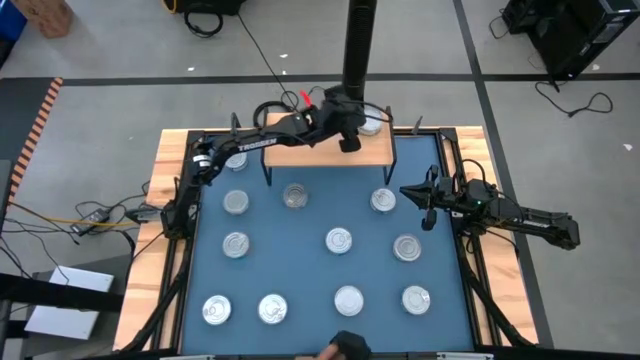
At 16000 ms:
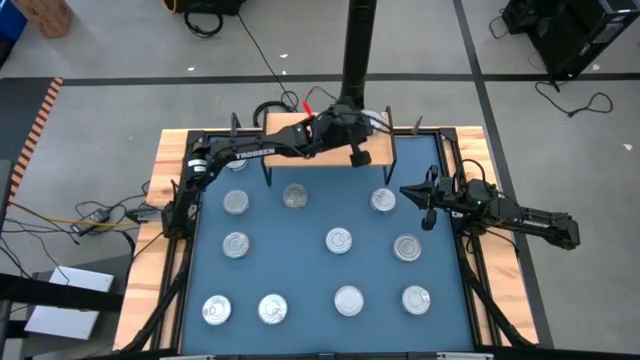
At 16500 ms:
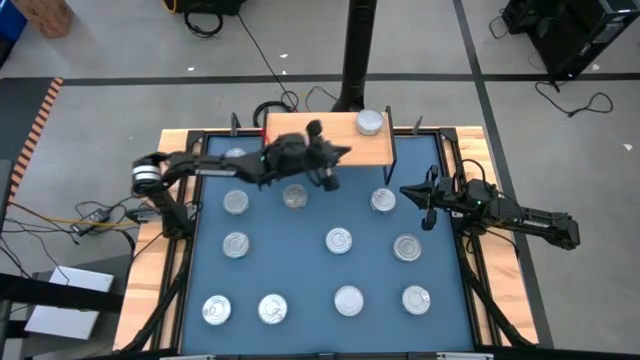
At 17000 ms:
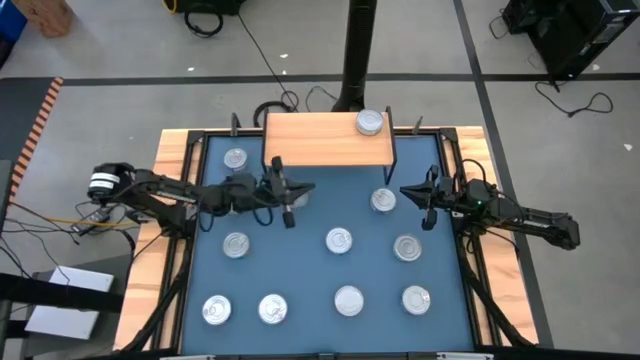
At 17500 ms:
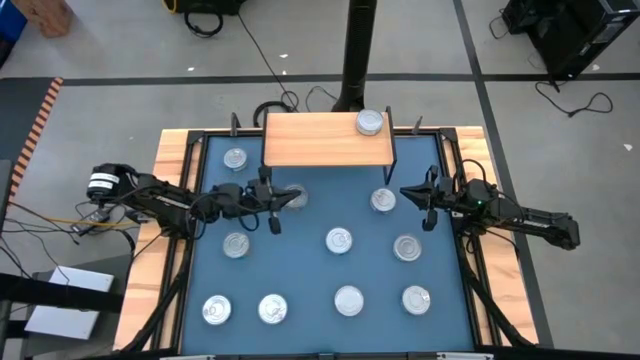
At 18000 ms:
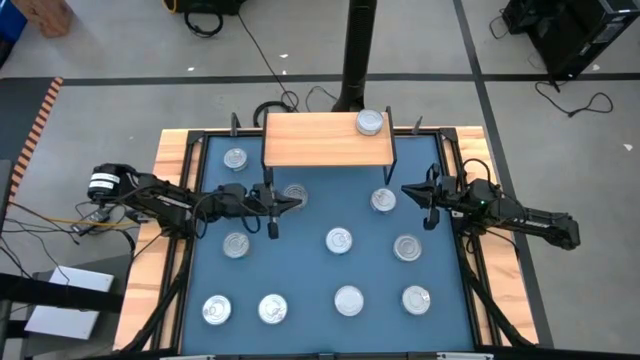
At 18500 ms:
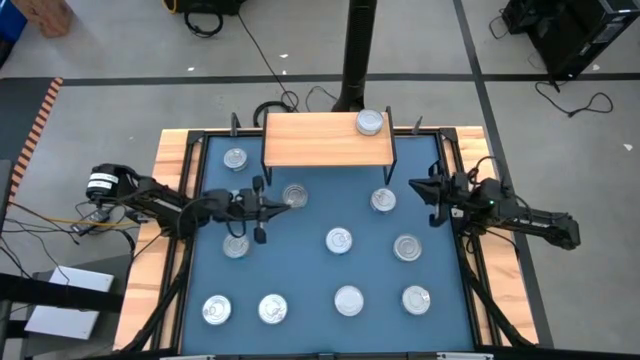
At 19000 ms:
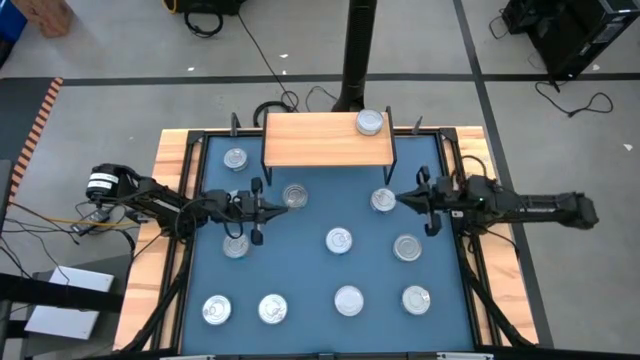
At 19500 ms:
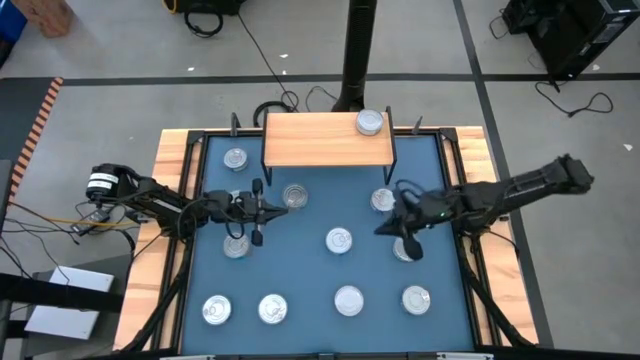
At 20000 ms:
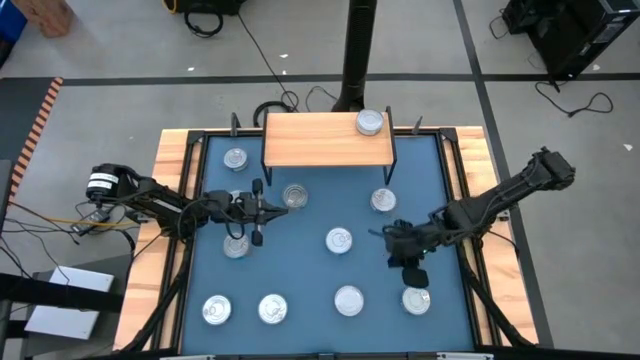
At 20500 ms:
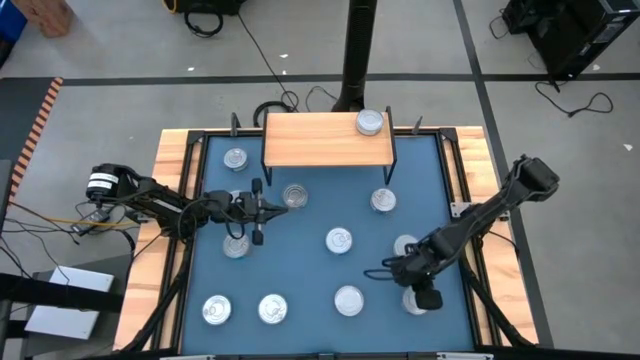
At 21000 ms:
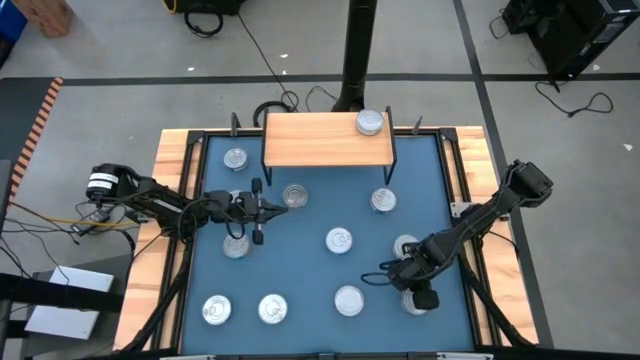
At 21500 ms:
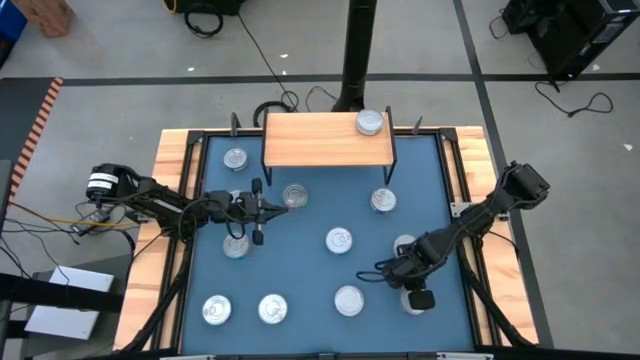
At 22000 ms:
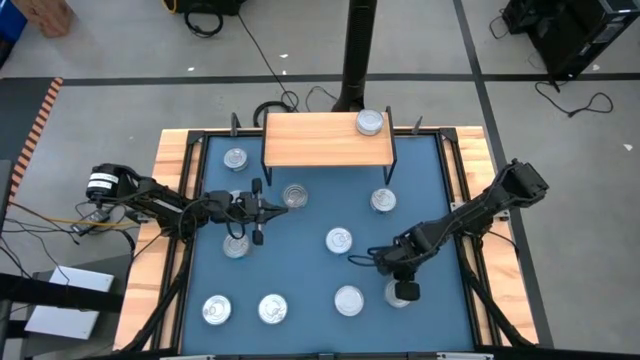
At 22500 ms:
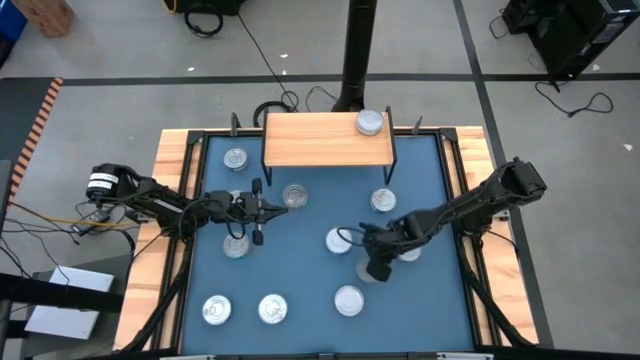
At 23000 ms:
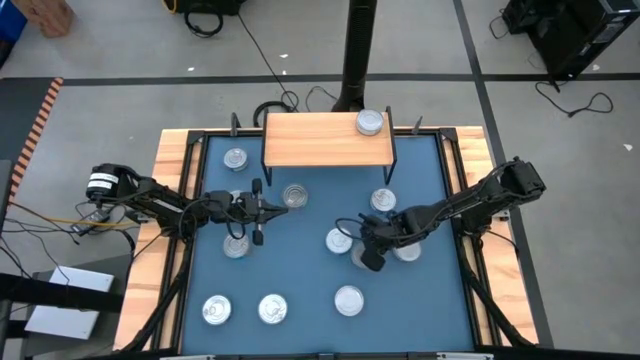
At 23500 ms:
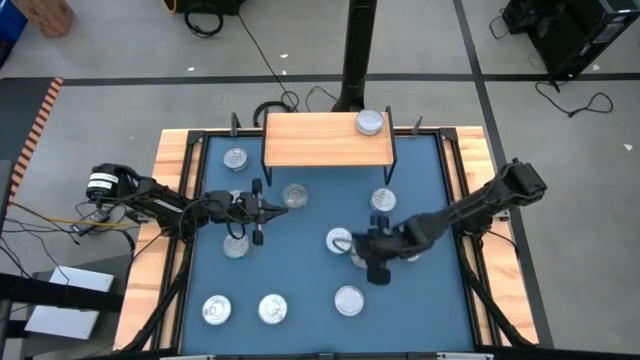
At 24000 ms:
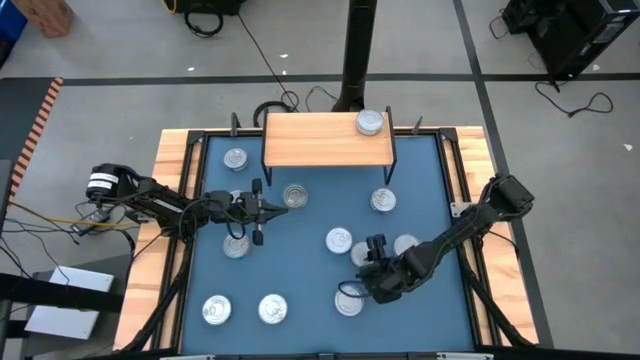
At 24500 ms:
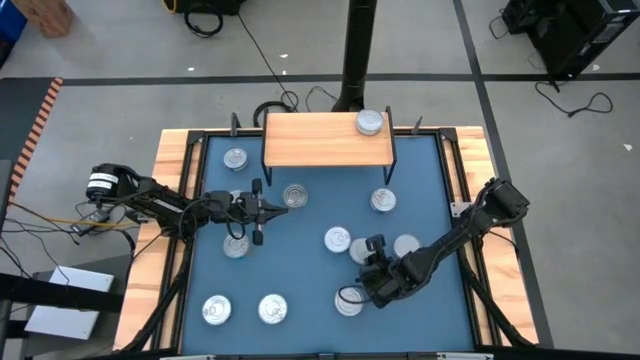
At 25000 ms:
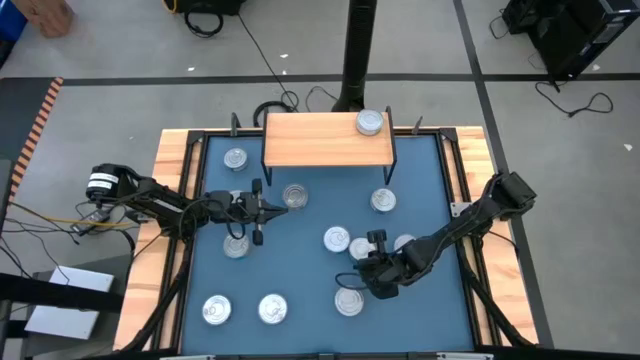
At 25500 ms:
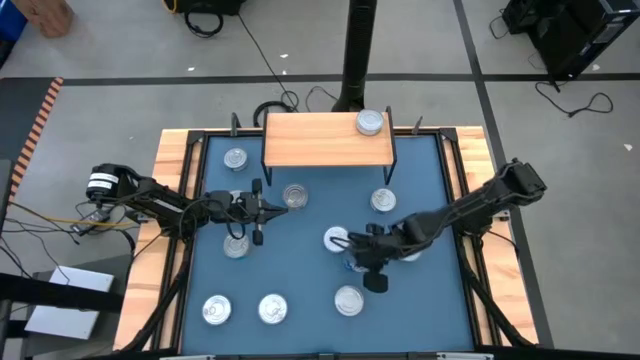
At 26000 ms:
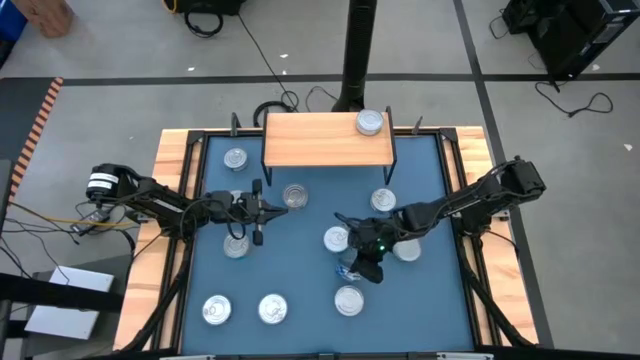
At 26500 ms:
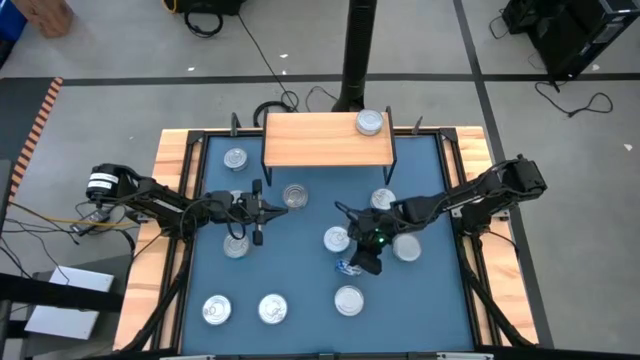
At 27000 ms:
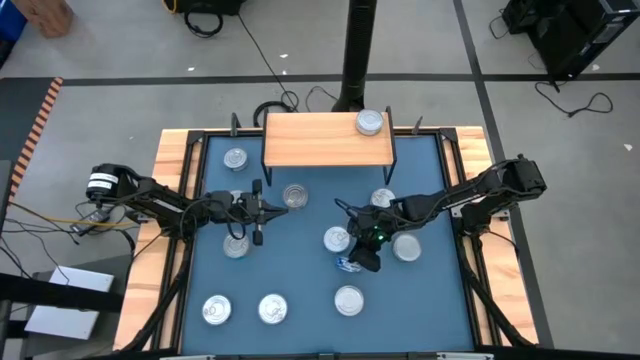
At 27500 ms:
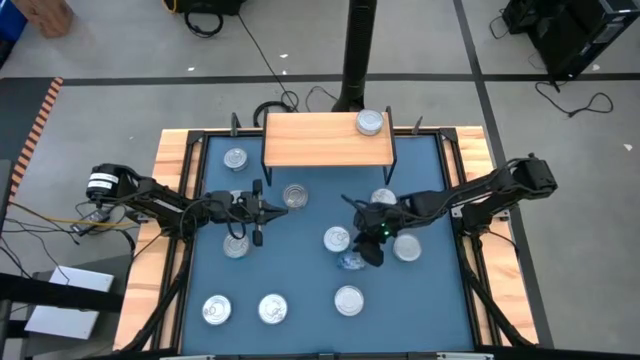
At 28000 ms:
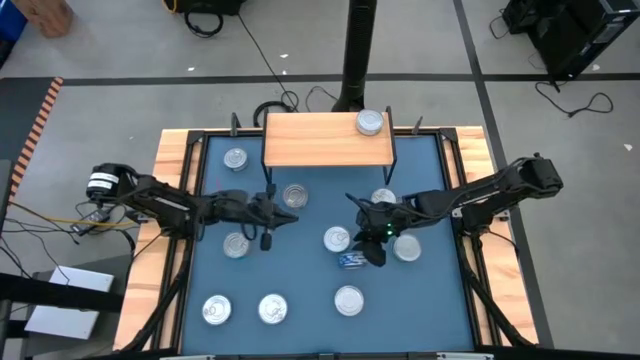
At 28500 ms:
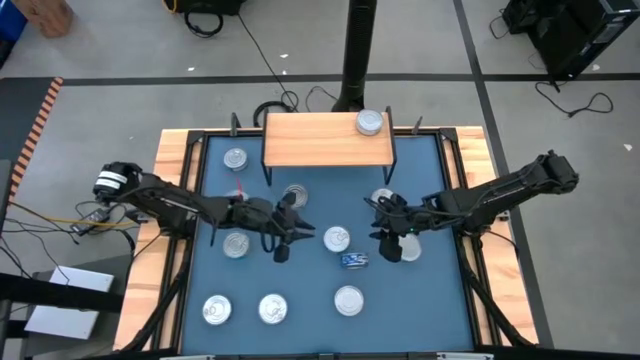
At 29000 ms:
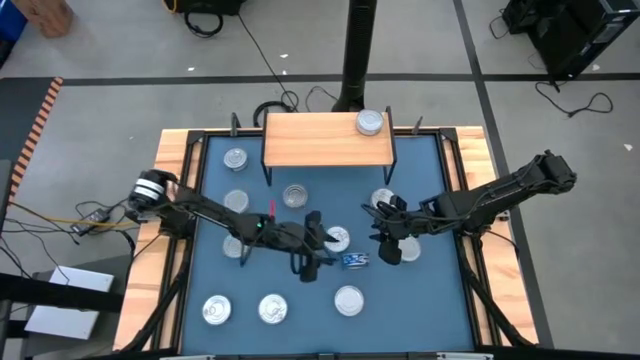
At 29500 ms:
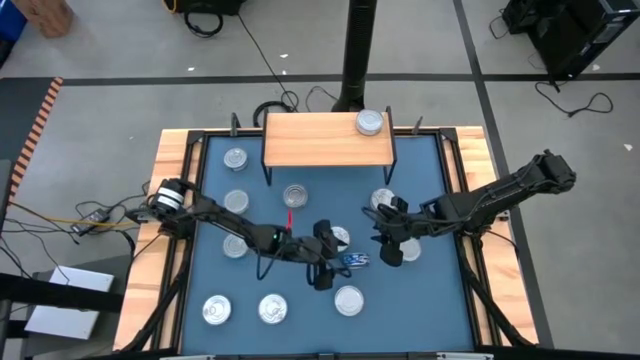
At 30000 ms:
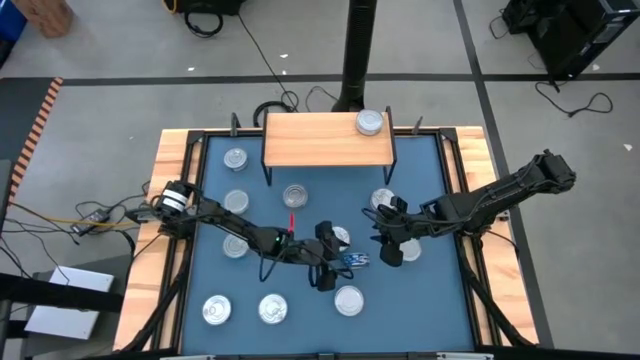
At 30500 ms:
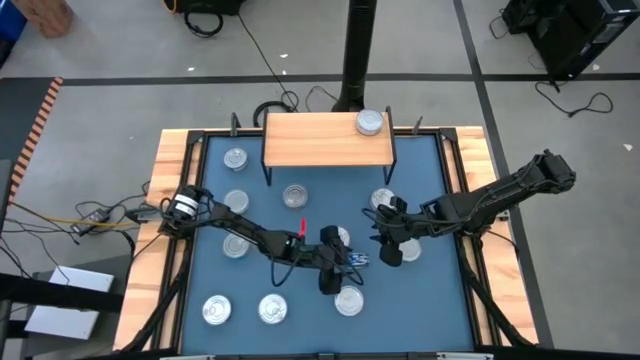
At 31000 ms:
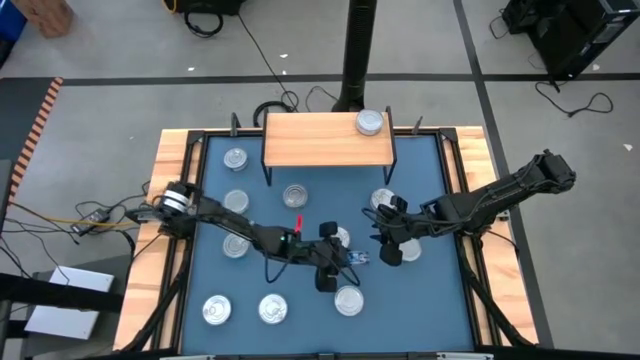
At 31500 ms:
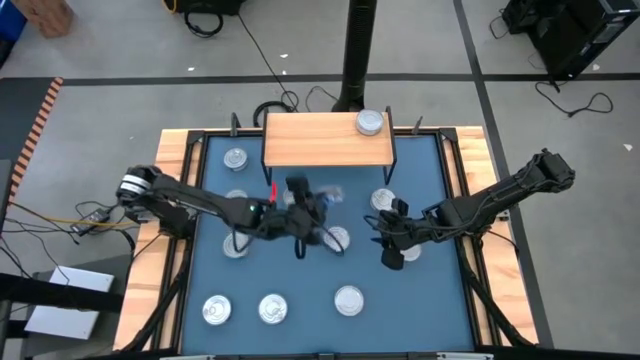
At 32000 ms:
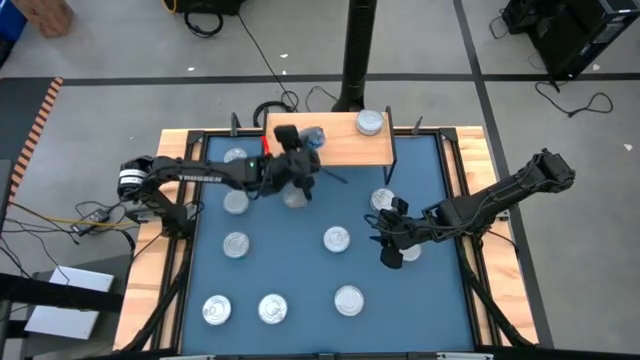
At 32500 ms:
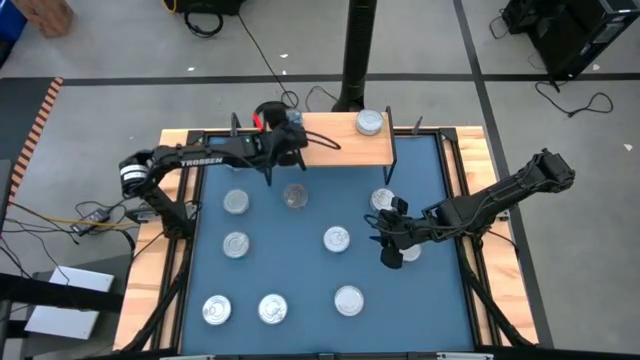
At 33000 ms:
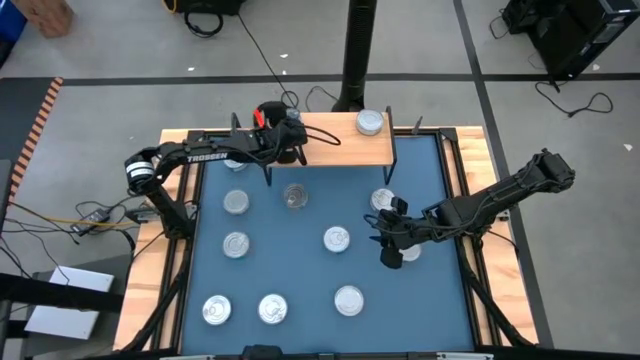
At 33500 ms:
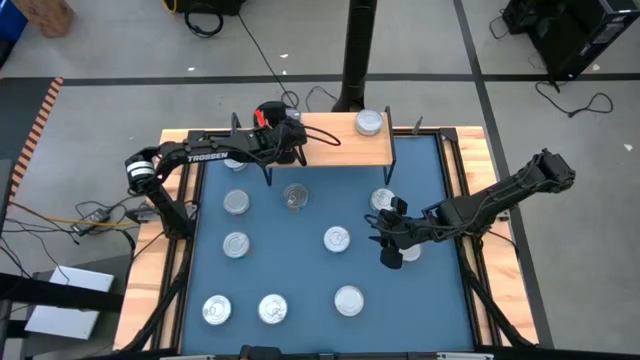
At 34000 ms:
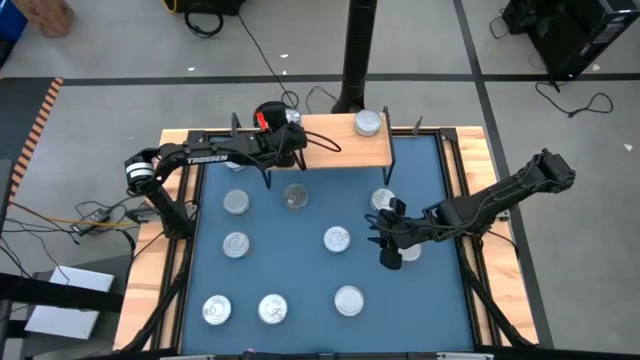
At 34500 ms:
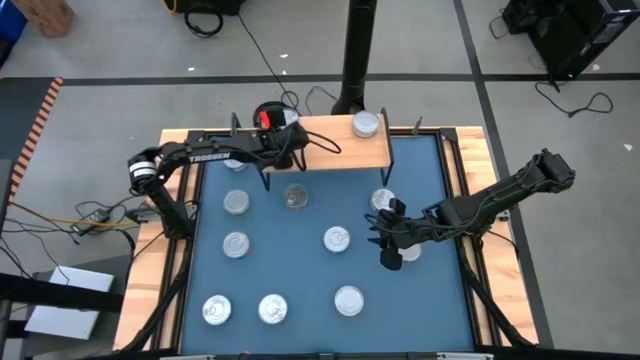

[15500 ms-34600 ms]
Task: Stack canned seafood by type on shelf
Put the blue tuna can on the shelf

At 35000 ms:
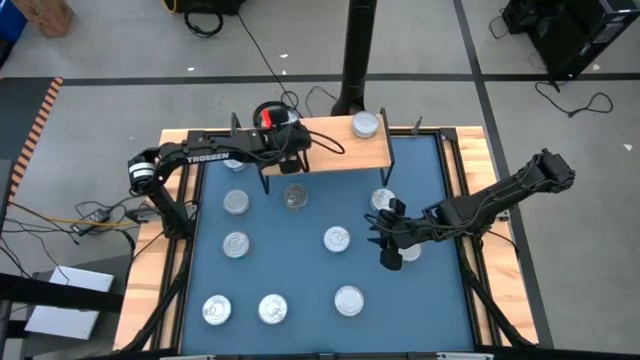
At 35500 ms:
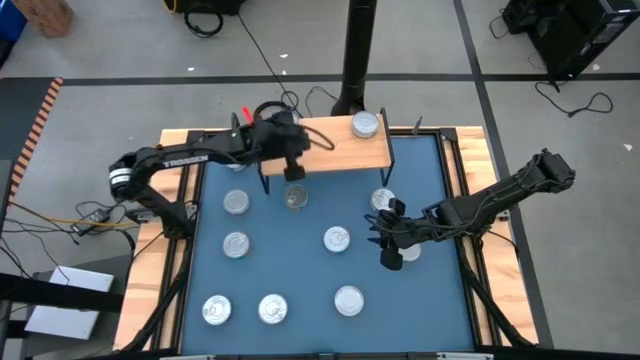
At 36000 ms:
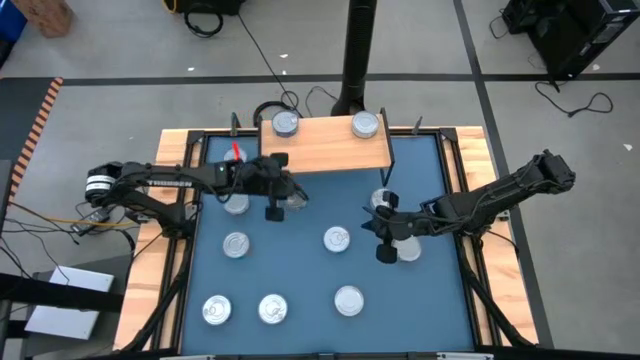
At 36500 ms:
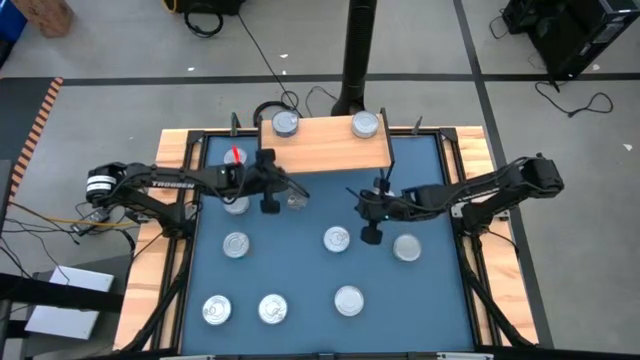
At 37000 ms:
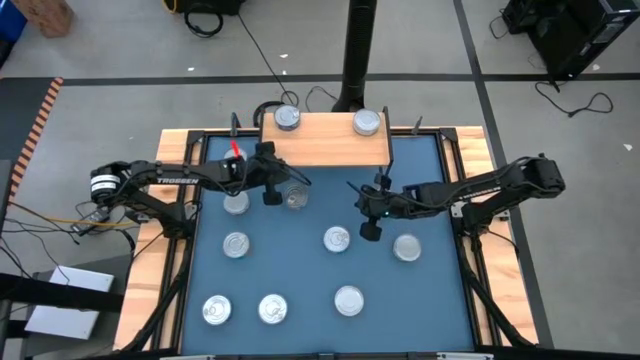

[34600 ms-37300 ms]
Adjust the shelf
